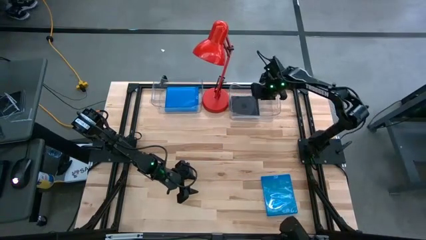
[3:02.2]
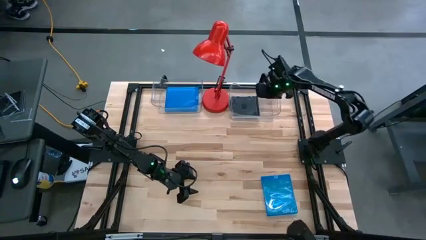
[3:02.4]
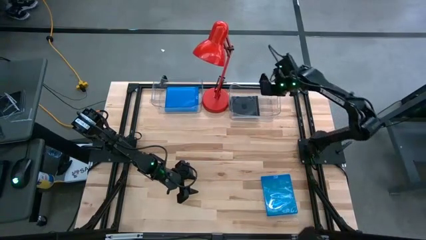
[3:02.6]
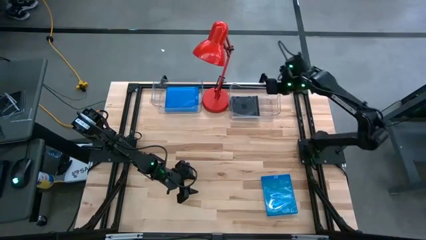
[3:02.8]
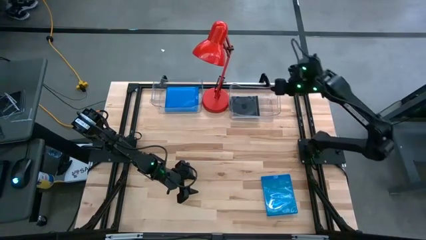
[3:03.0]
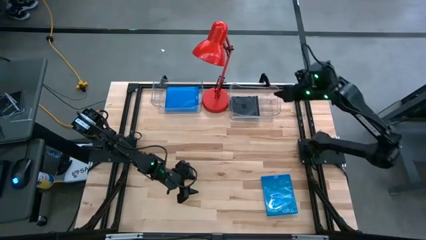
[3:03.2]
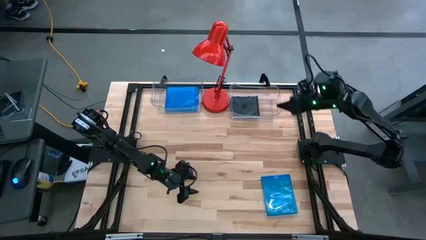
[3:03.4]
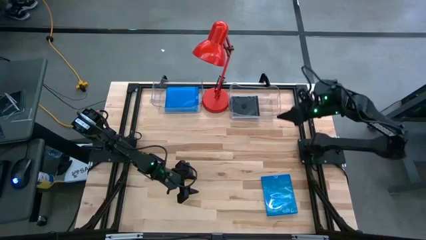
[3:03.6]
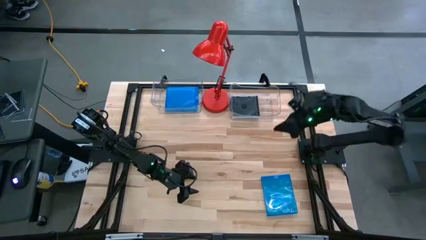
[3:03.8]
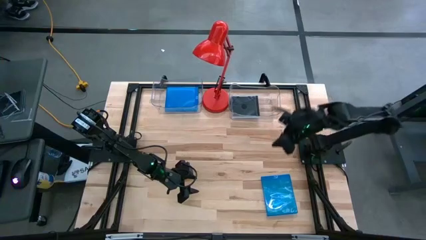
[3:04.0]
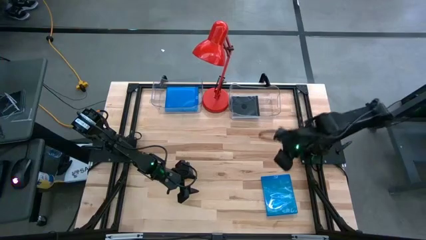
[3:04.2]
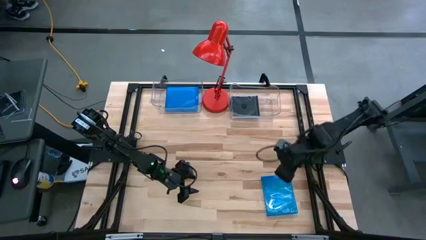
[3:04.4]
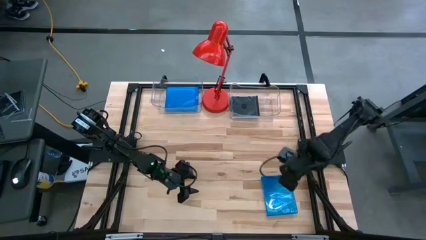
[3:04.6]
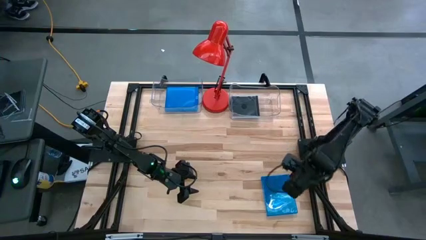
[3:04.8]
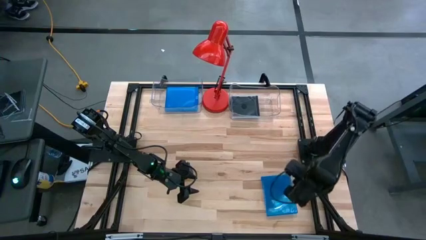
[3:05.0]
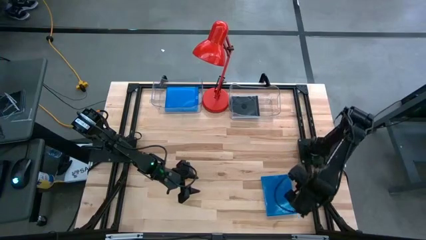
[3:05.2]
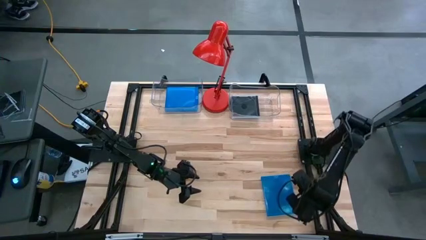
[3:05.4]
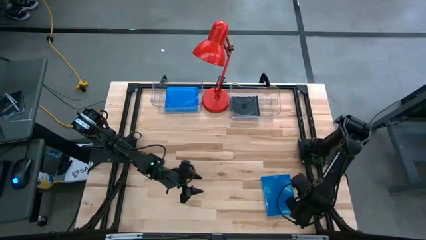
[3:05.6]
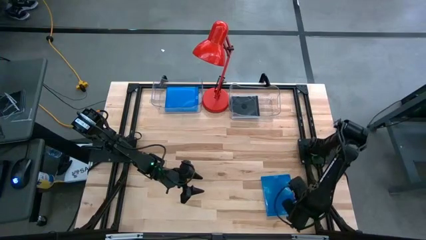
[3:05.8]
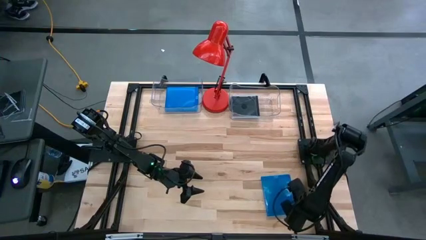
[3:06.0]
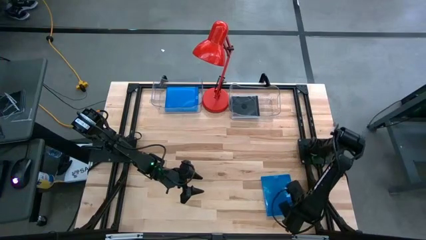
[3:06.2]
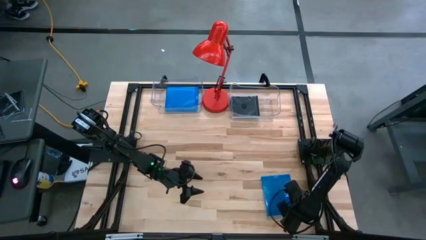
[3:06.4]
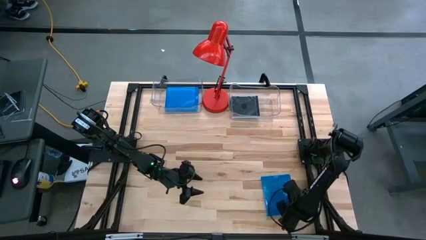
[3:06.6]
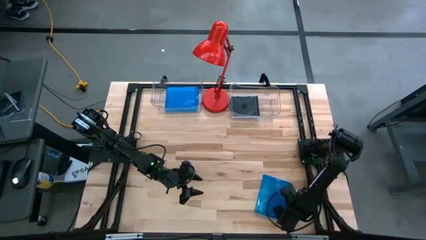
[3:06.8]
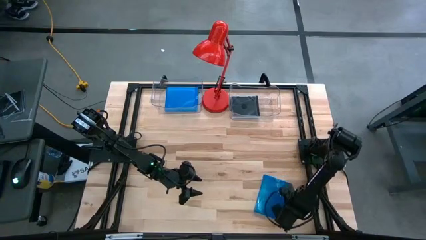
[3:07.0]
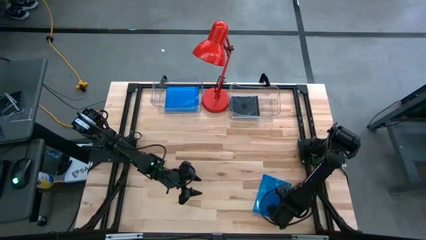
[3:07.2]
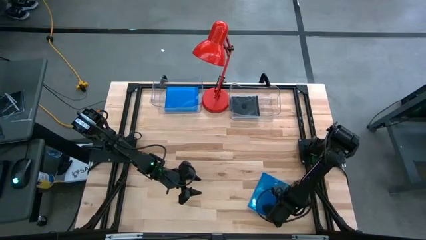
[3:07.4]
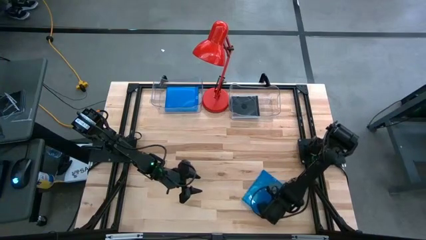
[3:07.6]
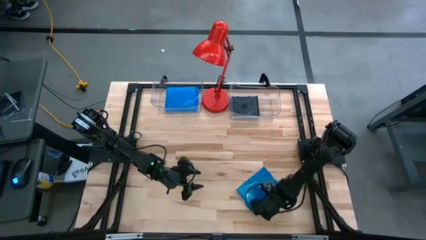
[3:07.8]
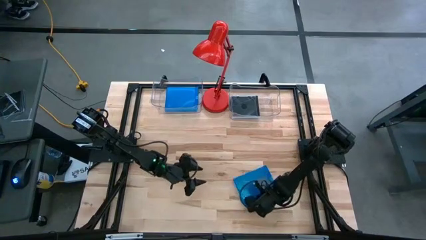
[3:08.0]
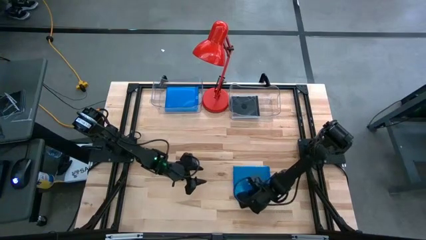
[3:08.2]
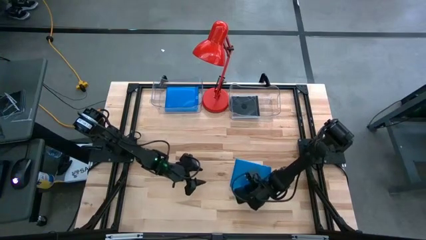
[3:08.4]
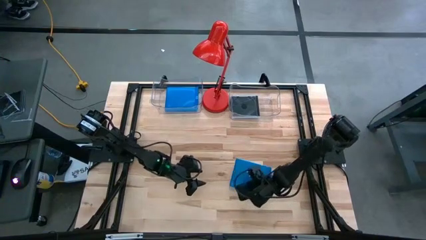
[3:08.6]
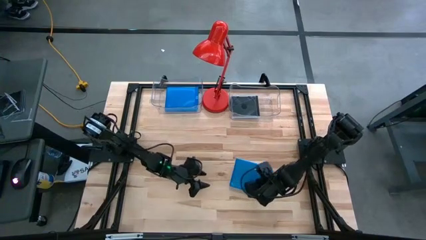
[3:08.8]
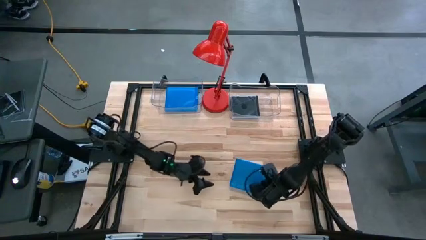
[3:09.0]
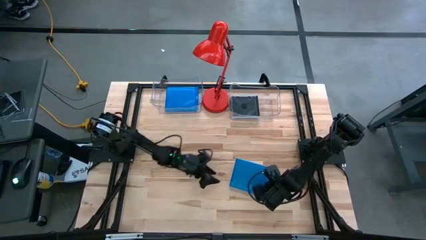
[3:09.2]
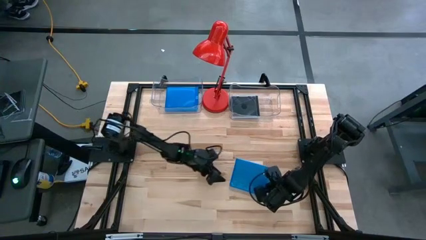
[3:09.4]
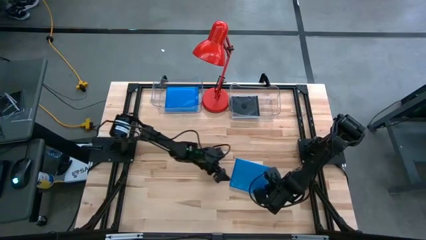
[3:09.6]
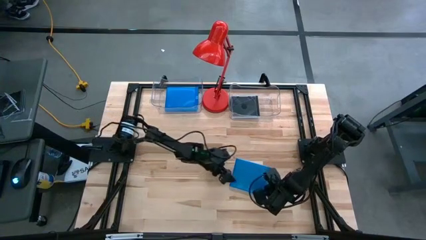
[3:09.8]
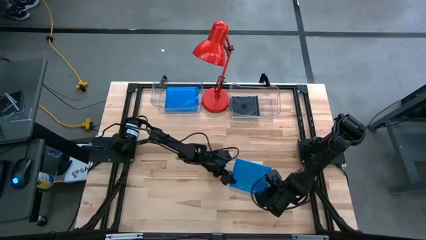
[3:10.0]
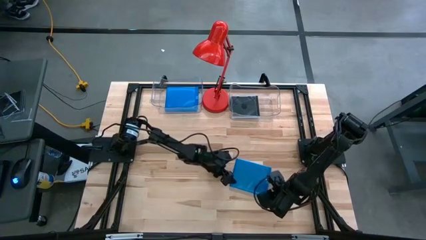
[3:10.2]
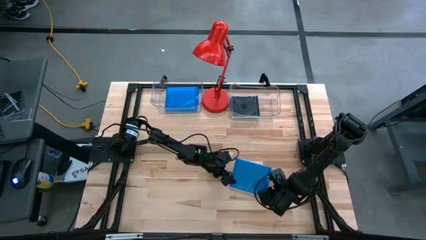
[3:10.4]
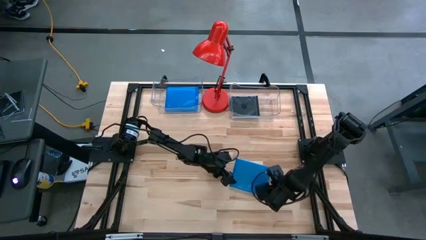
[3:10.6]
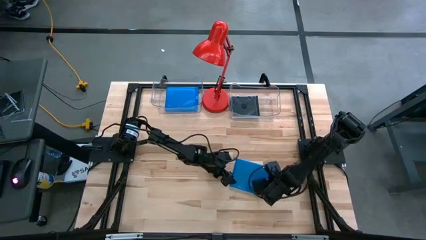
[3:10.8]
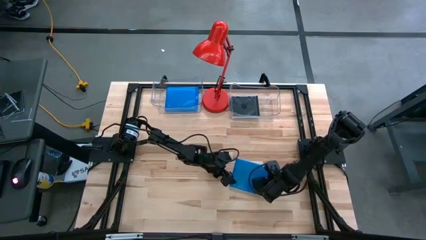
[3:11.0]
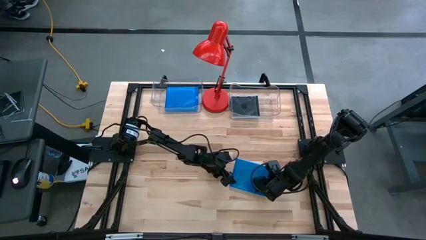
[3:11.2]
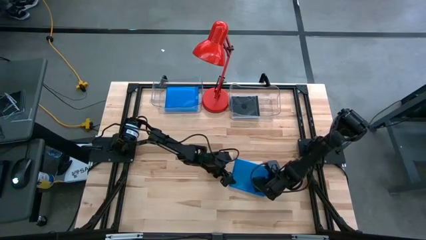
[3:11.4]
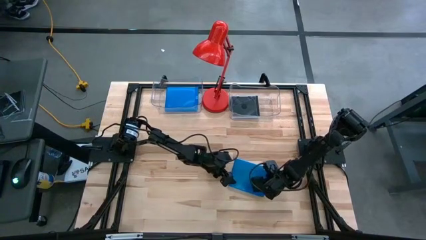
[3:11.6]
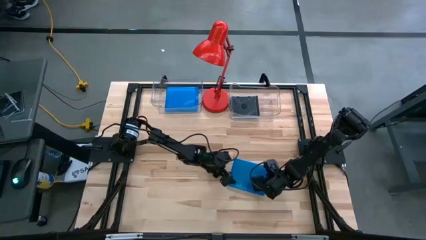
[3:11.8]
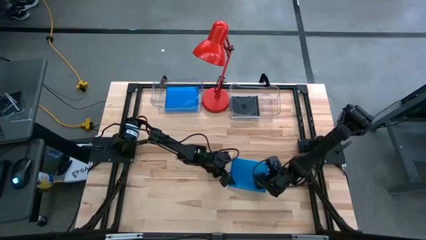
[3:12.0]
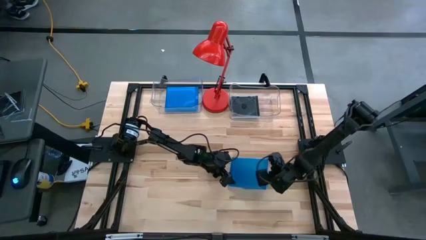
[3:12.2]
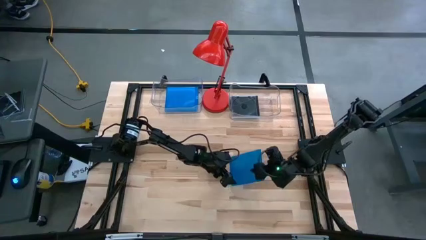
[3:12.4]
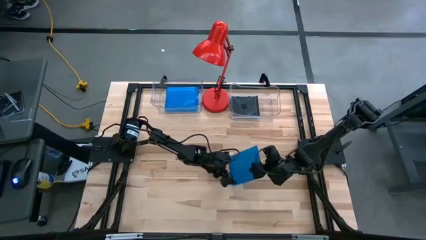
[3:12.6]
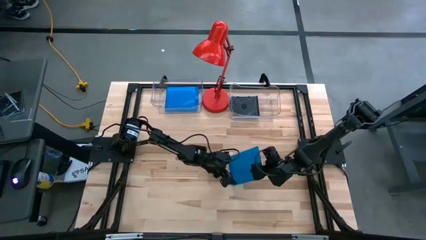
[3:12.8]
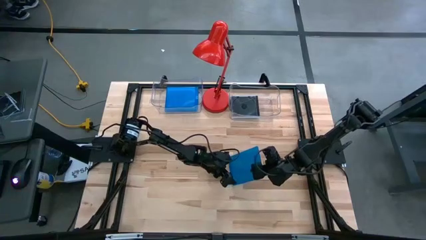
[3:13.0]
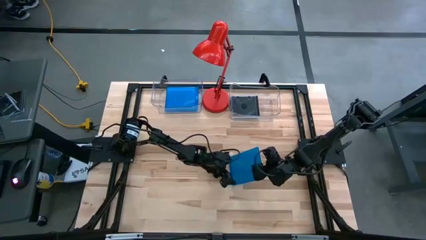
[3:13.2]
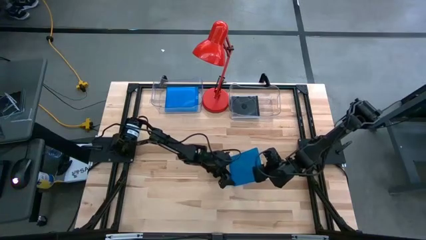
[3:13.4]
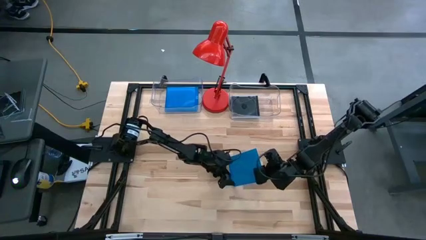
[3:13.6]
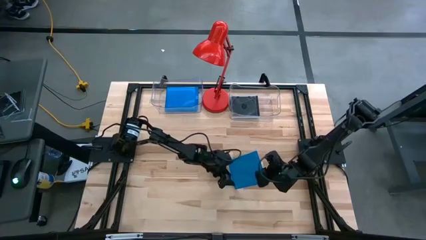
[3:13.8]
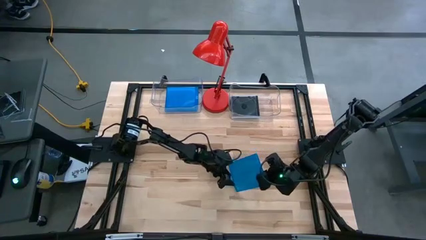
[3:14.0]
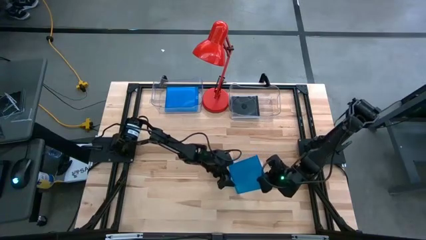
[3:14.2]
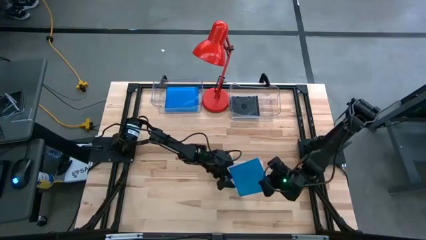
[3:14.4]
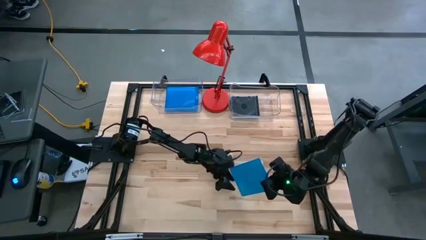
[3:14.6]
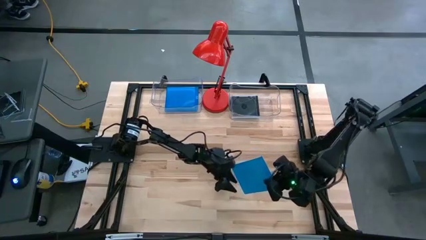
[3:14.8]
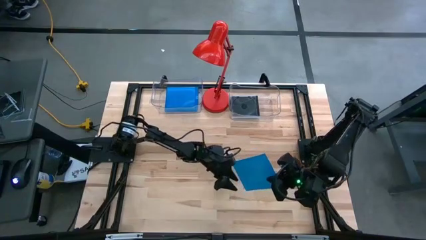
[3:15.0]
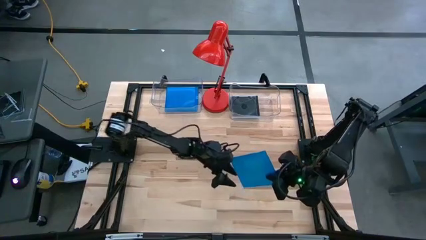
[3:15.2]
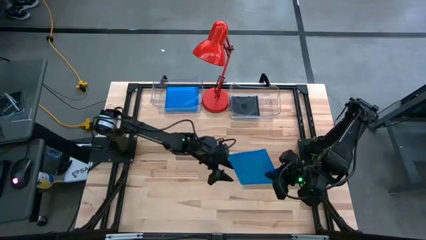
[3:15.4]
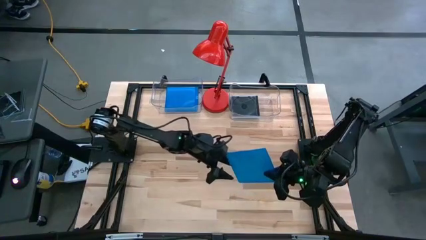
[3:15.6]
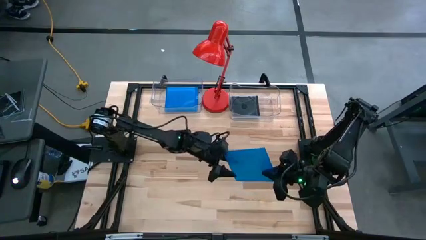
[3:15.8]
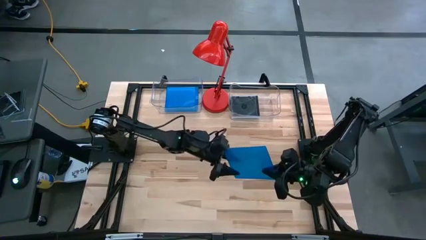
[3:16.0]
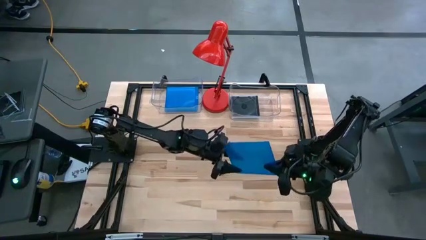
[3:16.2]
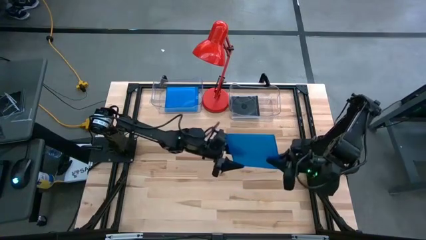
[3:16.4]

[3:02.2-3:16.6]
Task: Pick & place jewel cases by type
Put the blue cd case into the left transparent bin

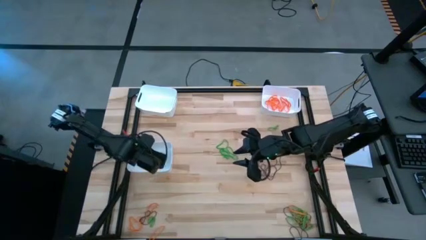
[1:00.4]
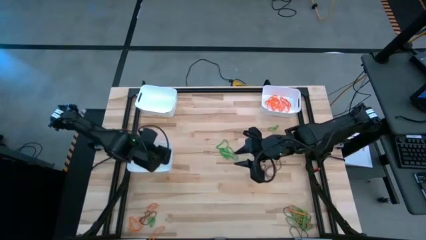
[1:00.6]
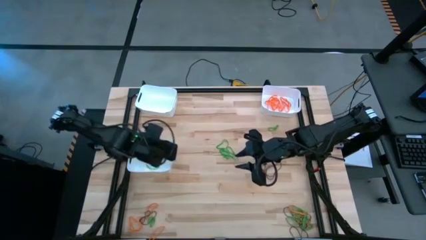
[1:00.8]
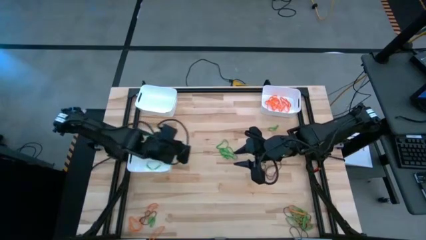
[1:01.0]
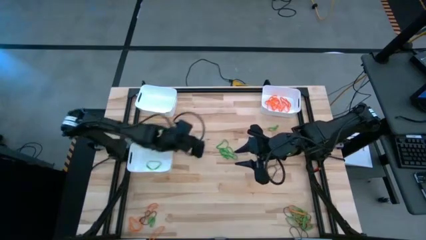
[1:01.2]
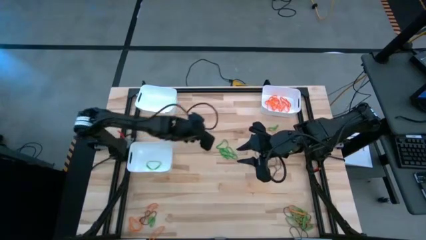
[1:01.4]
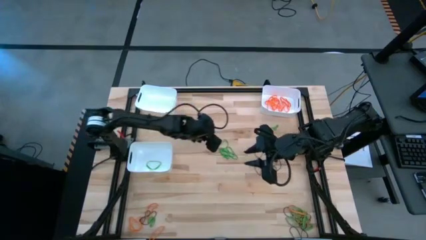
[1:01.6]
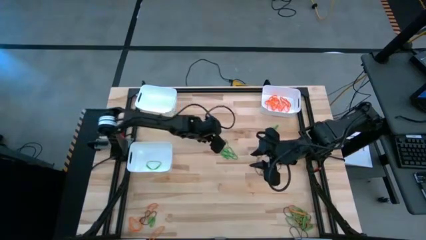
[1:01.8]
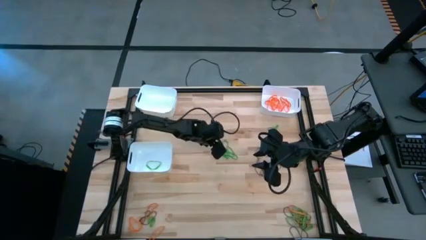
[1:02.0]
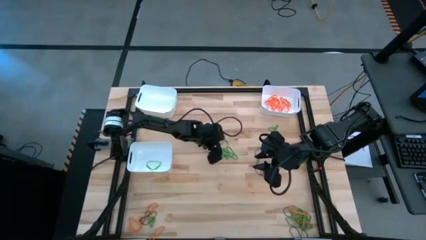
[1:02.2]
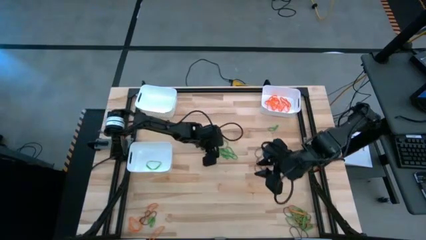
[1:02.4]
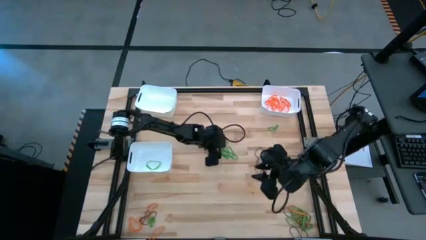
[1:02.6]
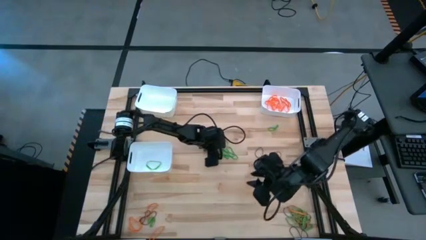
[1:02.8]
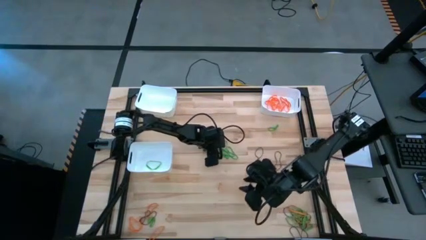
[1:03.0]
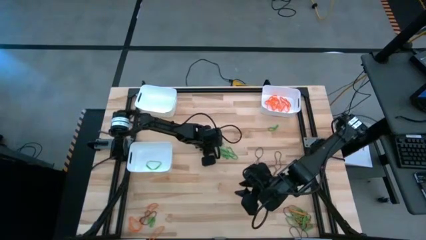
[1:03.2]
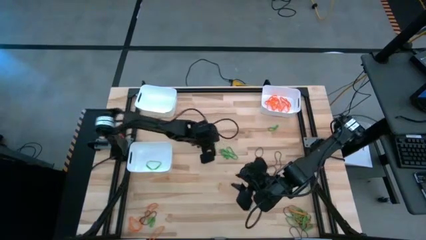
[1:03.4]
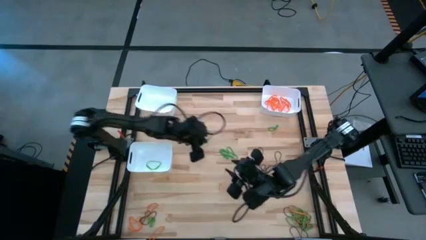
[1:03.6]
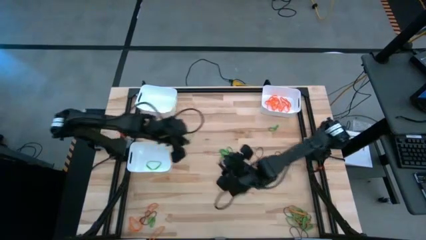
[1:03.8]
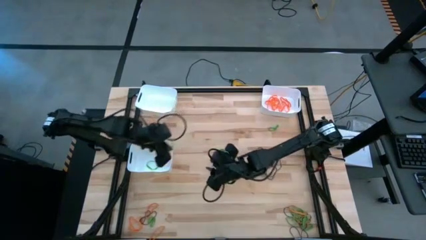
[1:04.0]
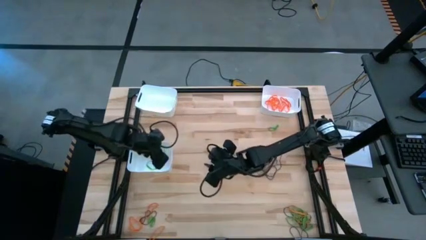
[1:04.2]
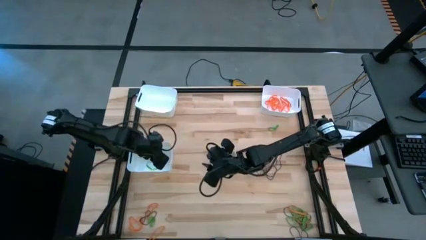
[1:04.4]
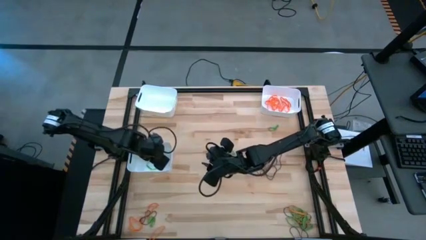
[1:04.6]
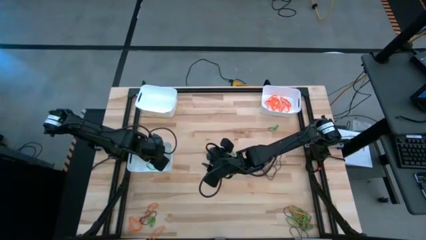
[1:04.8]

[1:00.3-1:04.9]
Task: Sort rubber bands into baskets
Put the green rubber band into the bottom white bin
